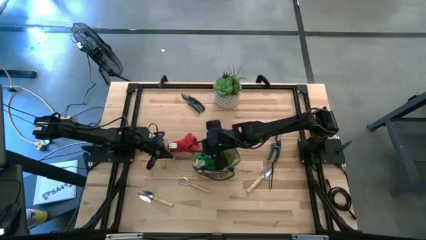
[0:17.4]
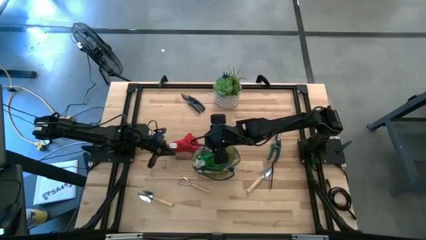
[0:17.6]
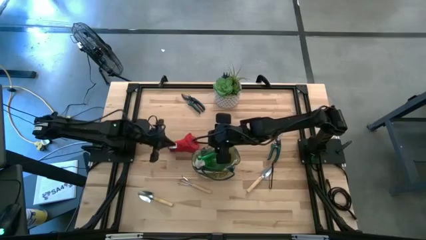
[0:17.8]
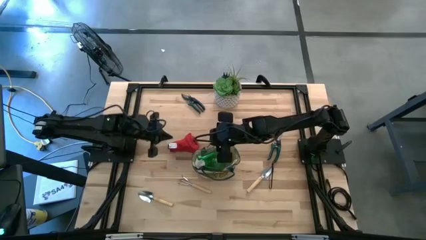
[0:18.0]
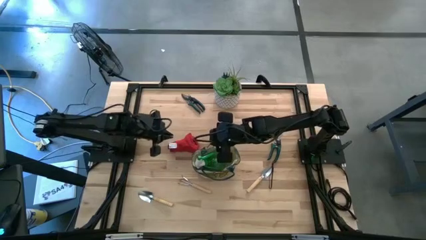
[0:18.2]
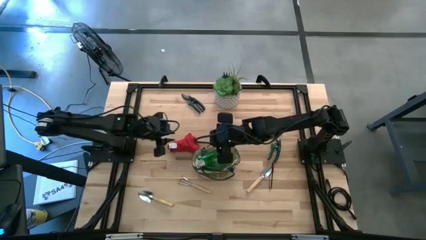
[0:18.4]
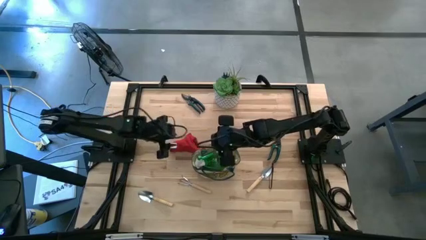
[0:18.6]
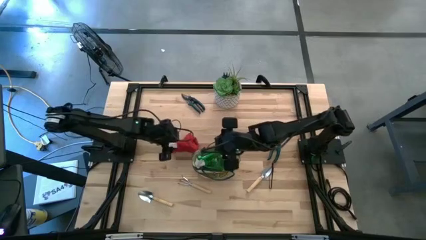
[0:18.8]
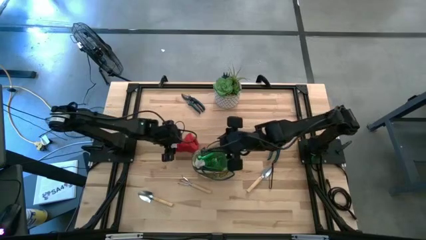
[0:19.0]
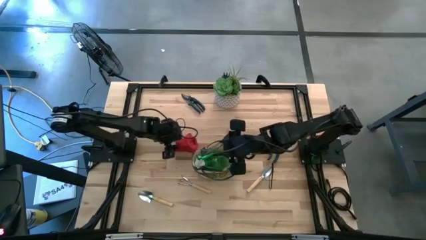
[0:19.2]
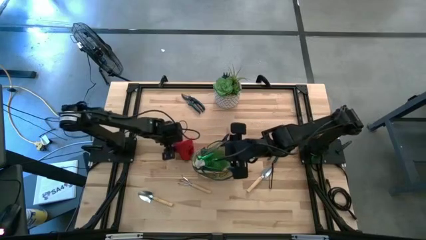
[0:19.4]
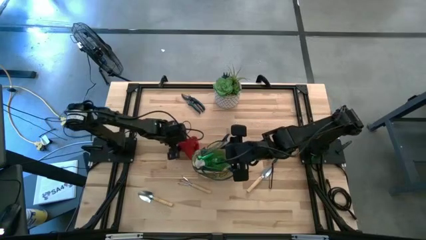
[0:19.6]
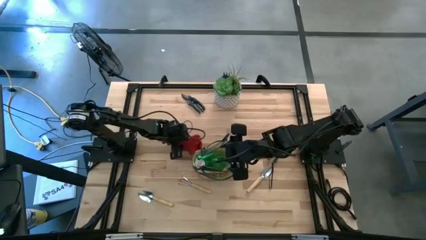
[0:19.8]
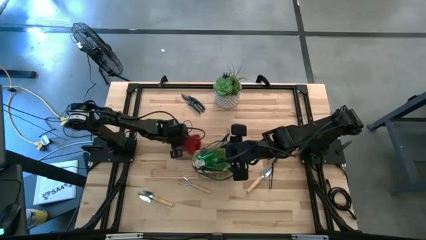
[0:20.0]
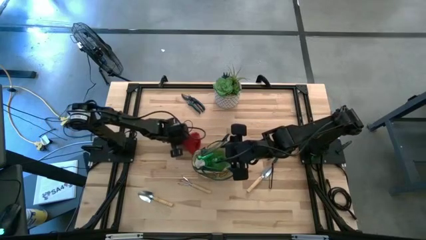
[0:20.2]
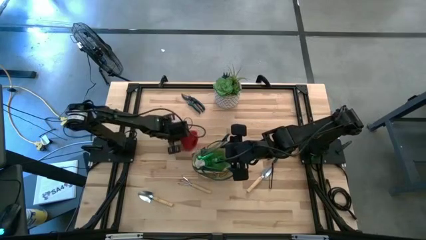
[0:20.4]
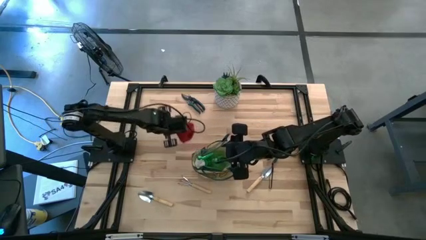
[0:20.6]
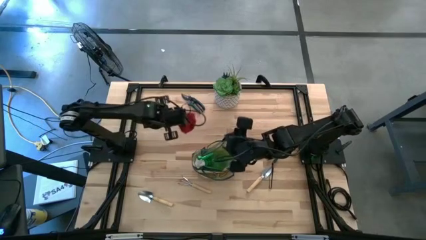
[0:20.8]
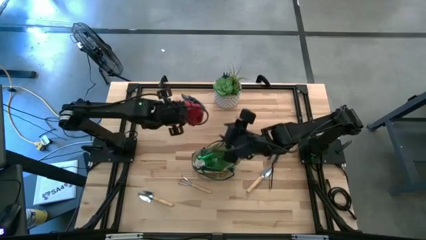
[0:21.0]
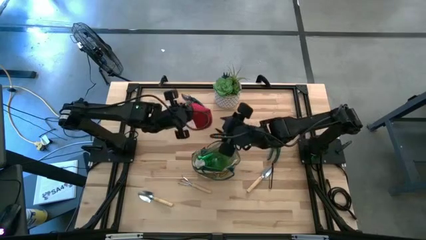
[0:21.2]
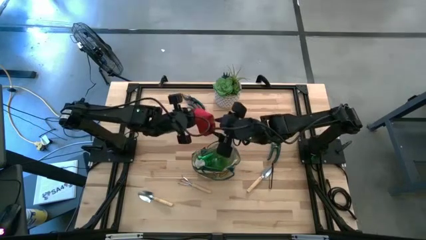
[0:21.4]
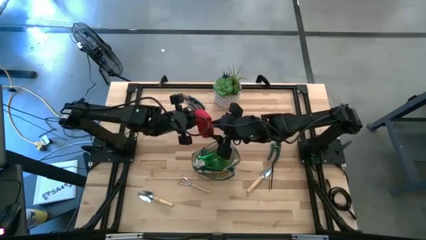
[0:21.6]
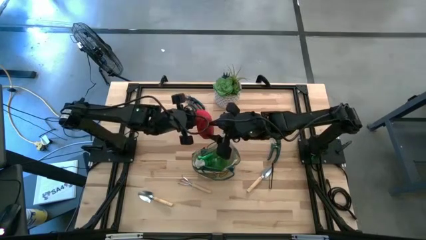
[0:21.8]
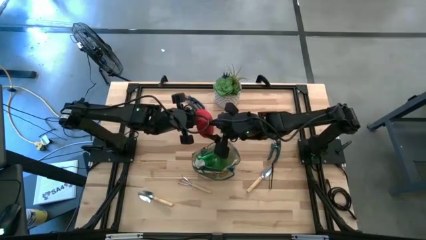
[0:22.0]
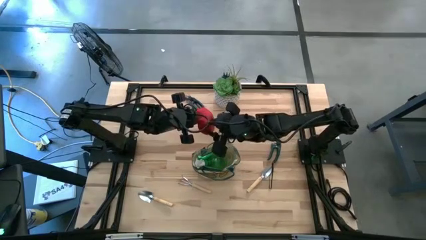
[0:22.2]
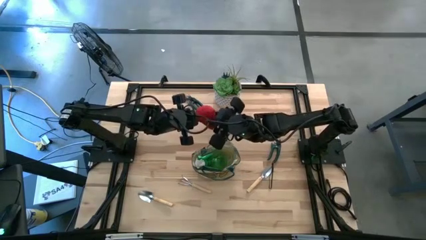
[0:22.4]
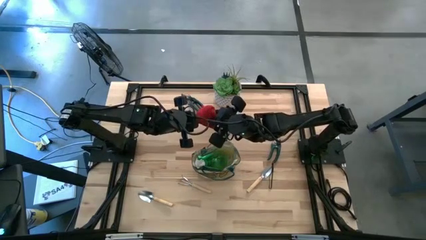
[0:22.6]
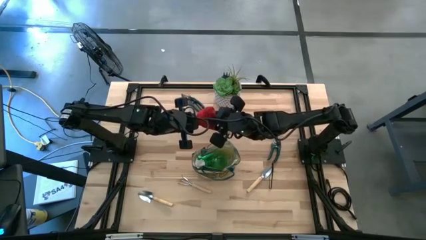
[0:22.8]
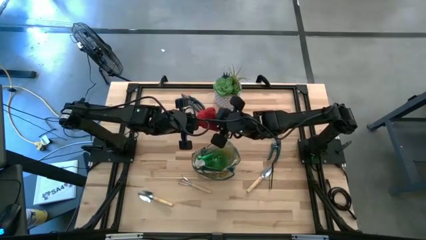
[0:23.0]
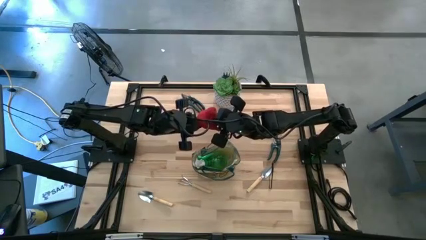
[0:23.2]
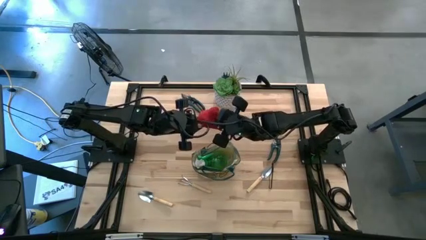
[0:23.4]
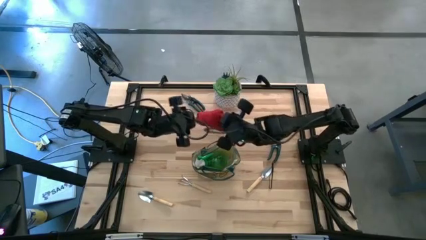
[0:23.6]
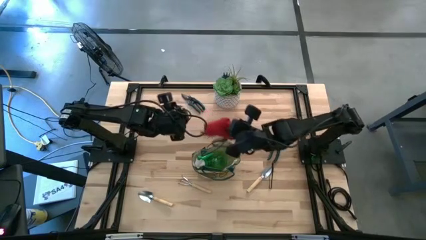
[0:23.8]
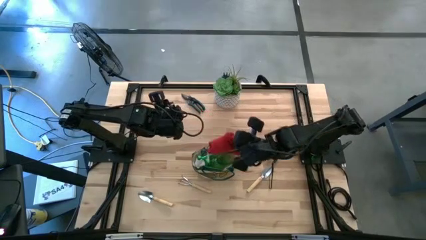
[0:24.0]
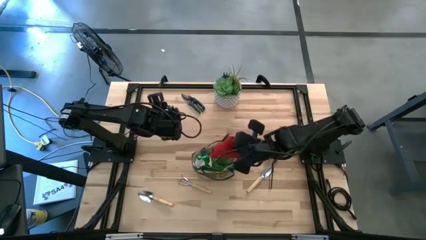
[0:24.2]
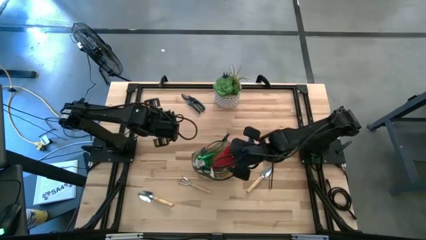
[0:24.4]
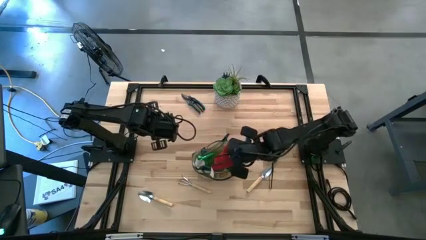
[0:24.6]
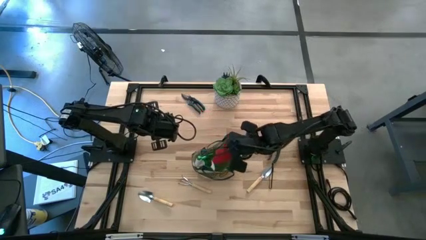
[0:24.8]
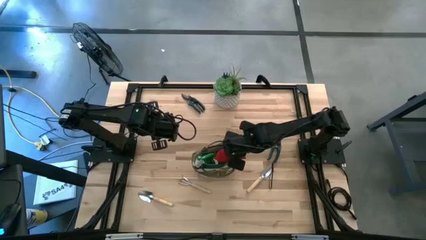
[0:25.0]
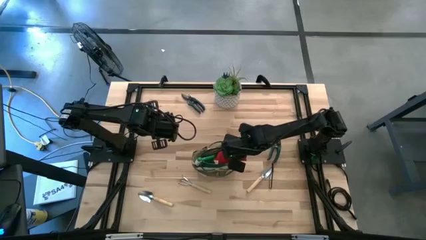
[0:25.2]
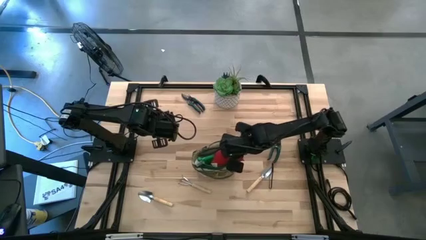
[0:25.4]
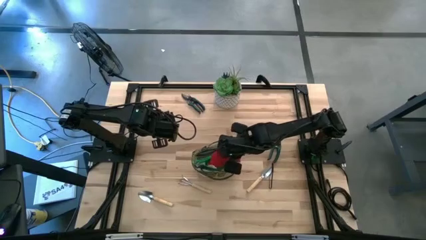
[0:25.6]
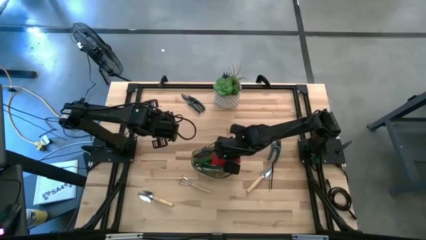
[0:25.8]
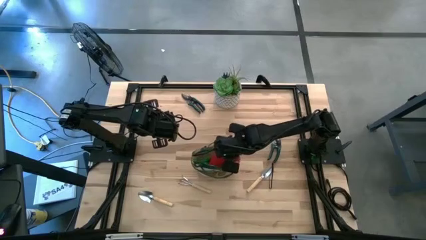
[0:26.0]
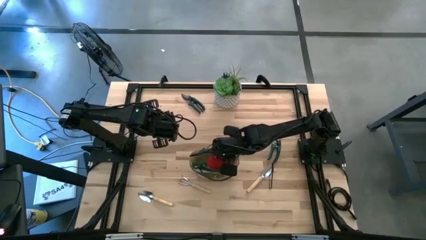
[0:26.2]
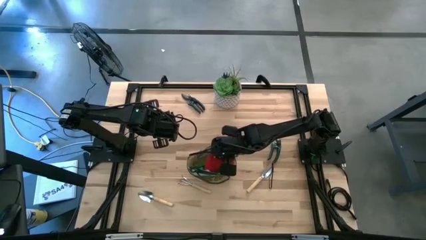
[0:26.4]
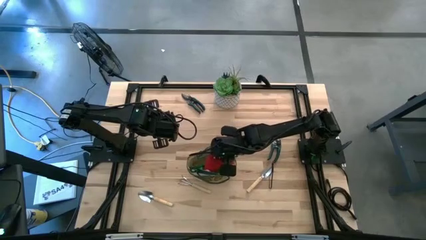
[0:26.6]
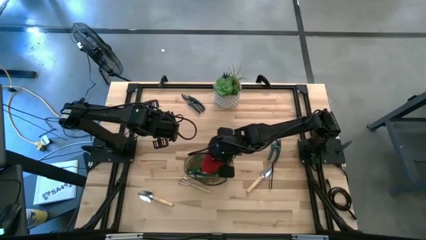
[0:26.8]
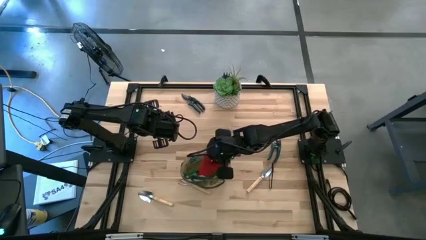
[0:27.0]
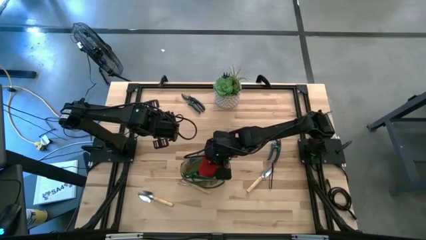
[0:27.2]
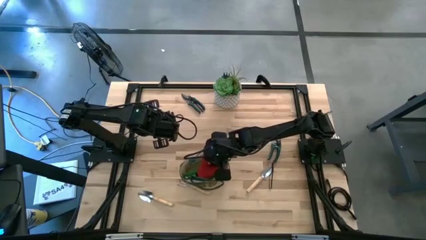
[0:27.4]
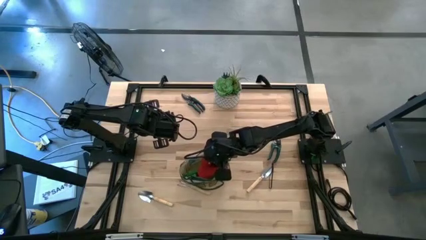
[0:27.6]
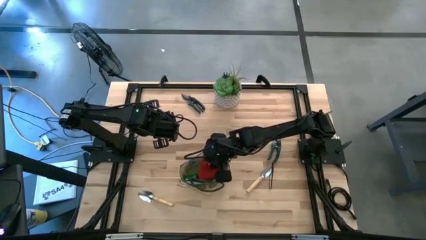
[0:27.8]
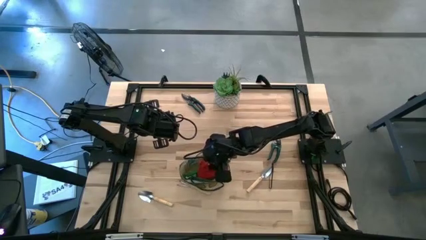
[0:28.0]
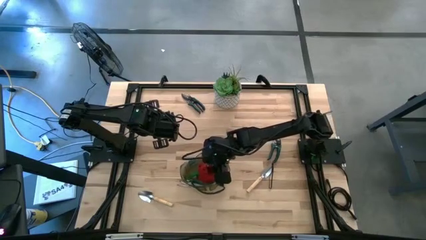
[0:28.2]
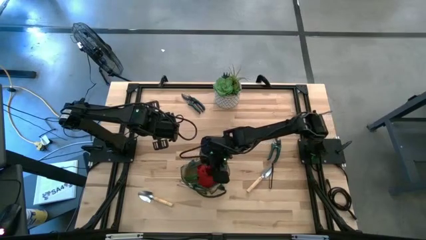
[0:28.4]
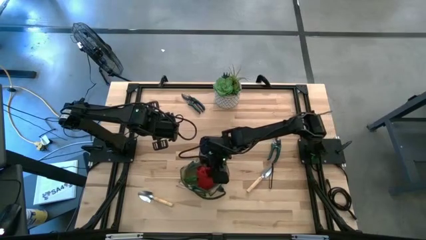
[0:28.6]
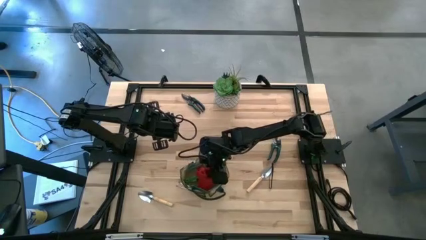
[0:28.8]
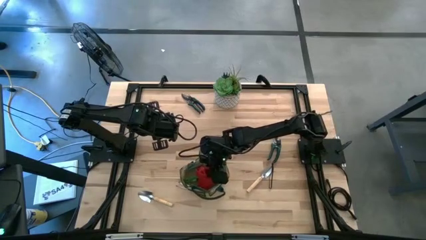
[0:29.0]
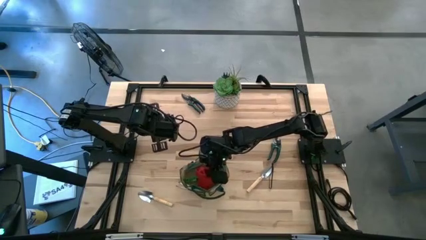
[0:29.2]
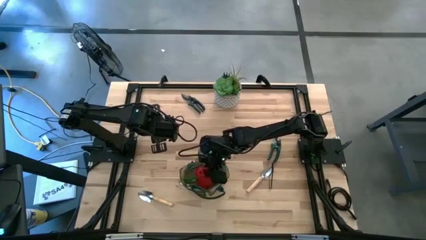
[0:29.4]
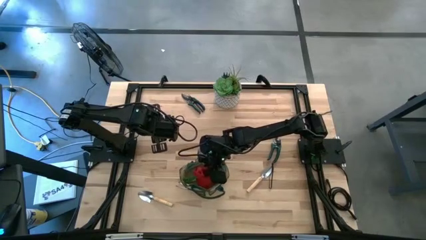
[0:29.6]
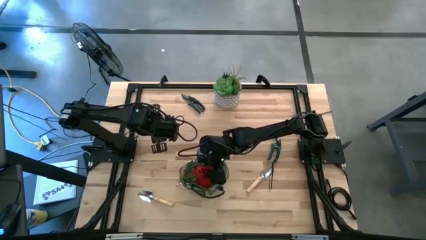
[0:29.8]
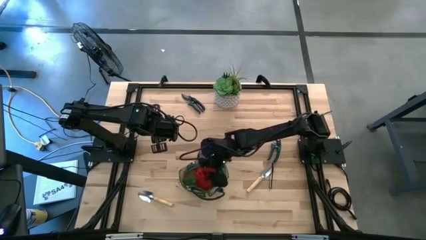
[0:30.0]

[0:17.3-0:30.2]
Task: Pick & Place Garden tools in Gardening bag
Put the red gloves into the white gardening bag
